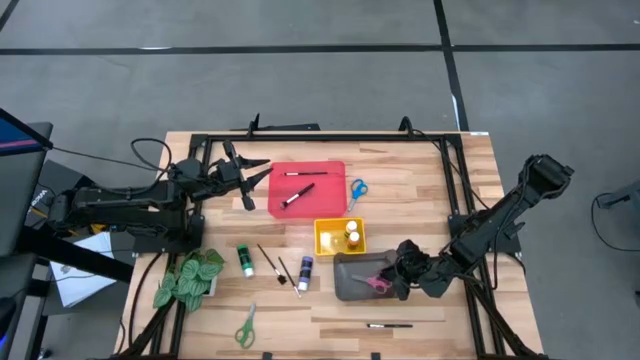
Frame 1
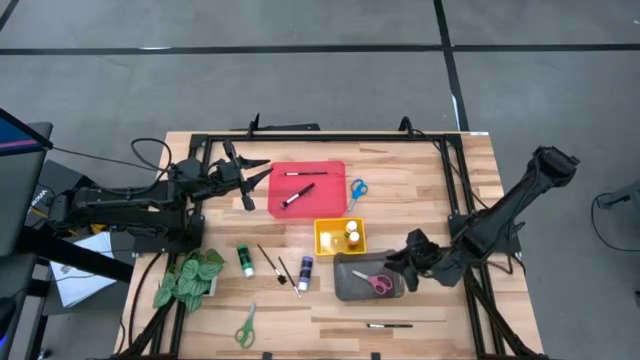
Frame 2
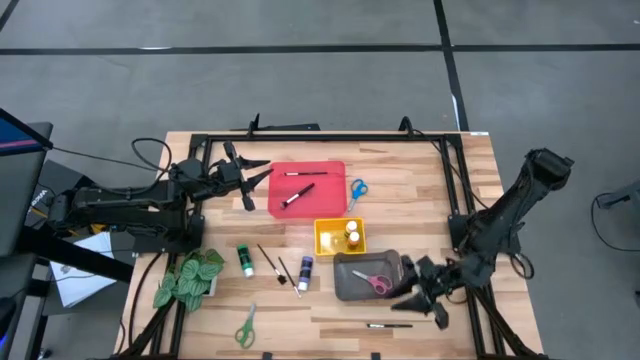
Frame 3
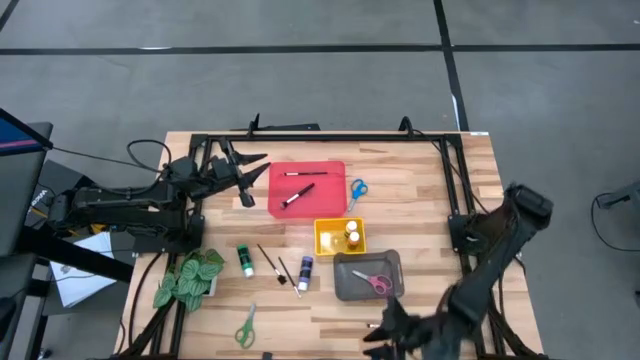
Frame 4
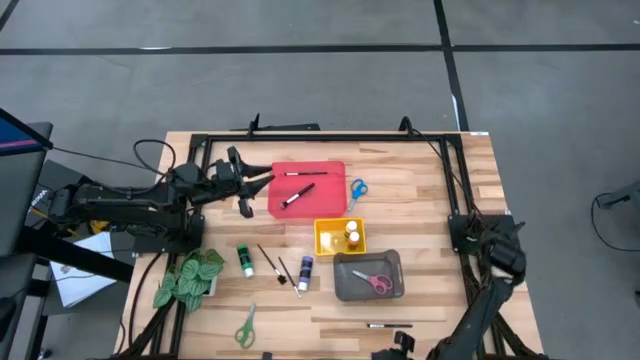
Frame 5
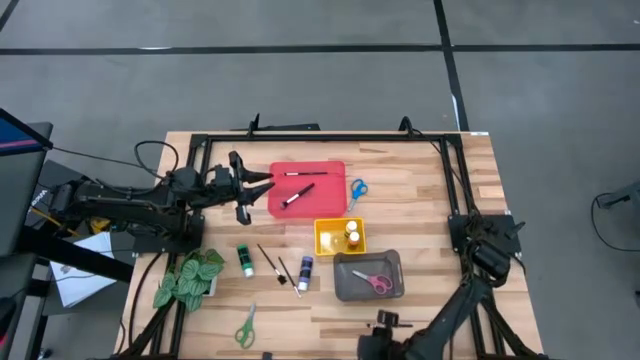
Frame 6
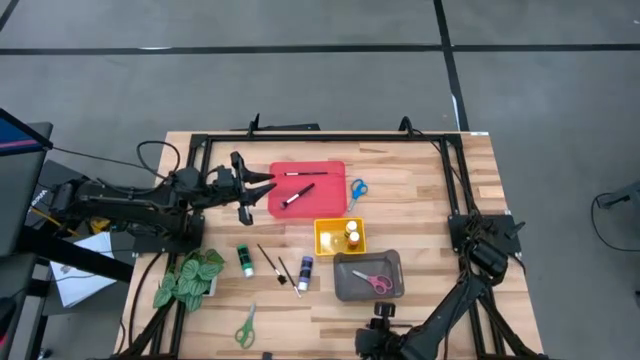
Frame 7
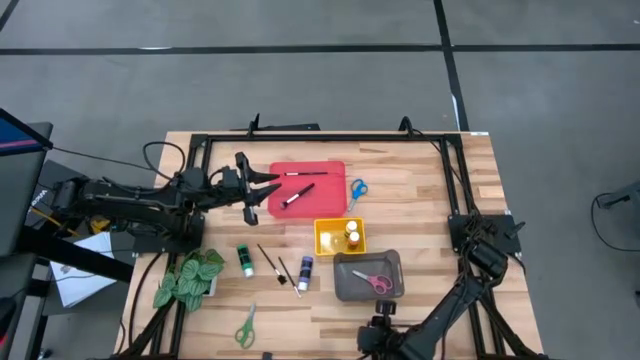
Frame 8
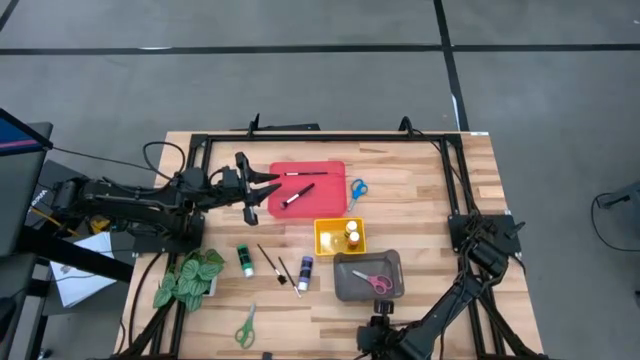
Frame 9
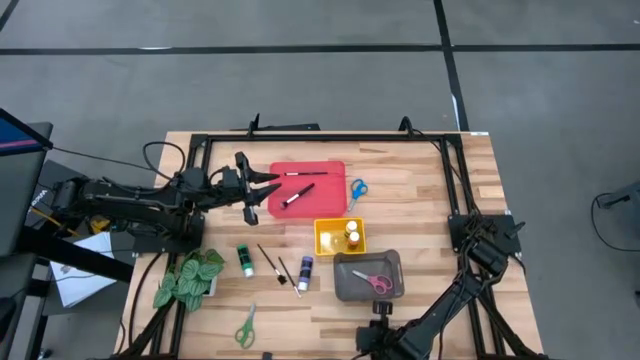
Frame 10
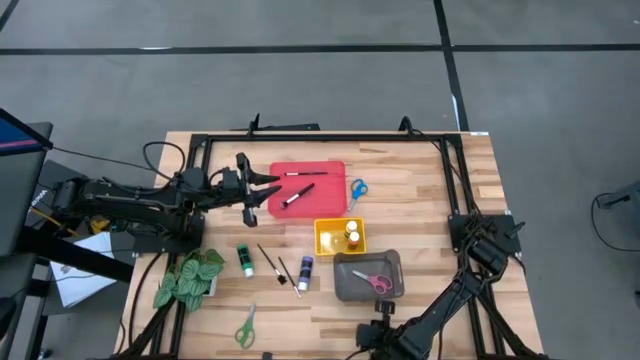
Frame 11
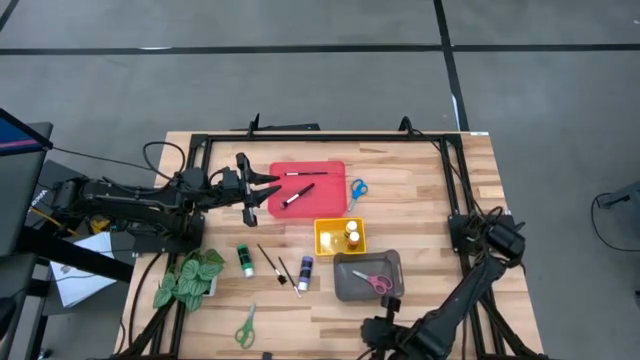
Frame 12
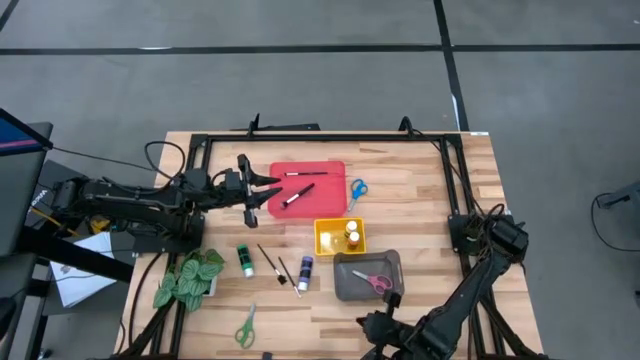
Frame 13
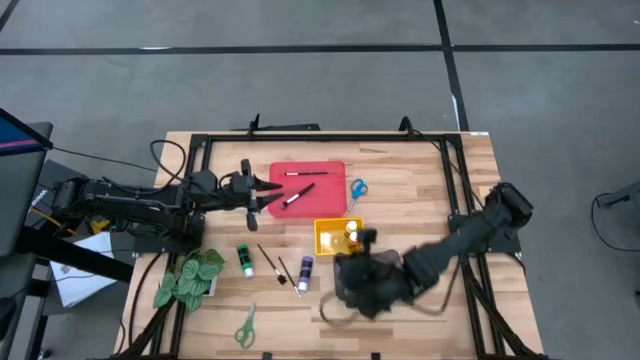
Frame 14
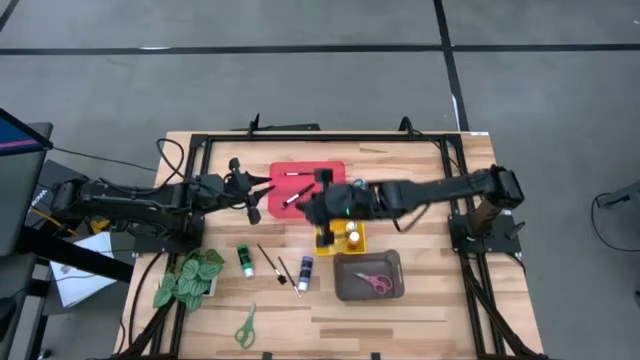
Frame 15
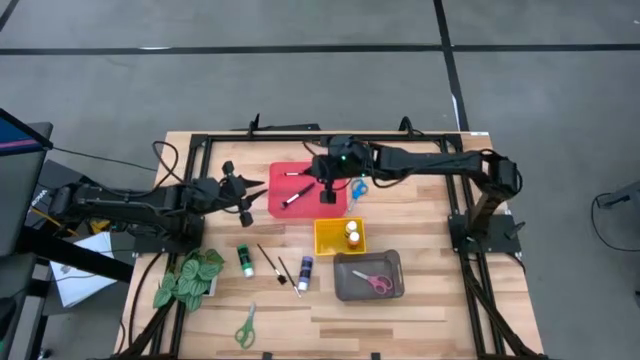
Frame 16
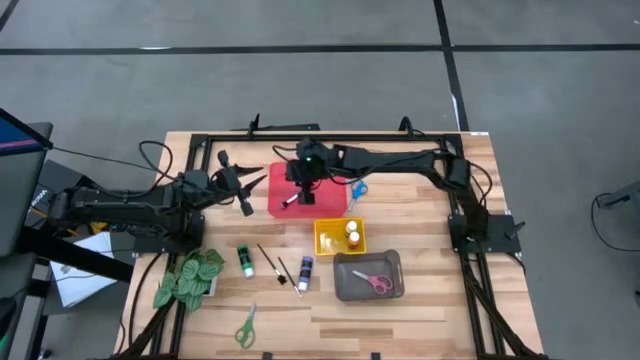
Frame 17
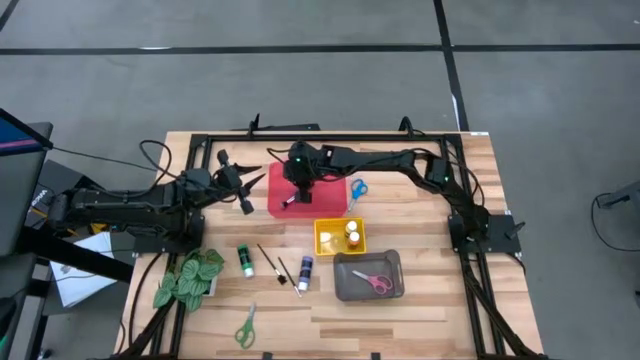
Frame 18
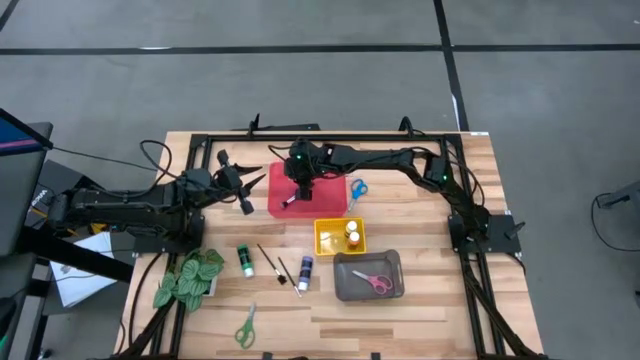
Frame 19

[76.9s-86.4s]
Task: Pick & Place Paint Supplies
Put the bottom eyeshadow brush into the red bin

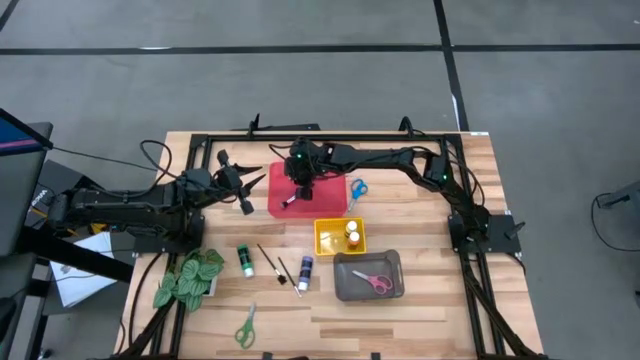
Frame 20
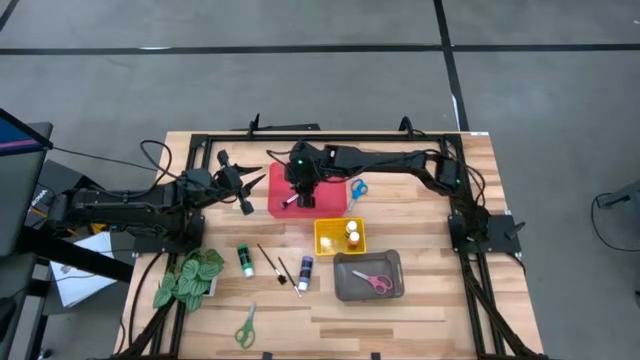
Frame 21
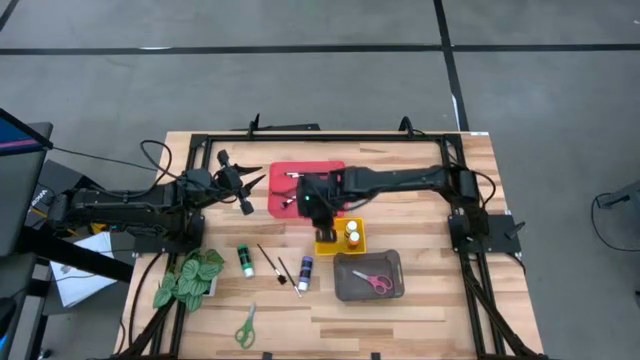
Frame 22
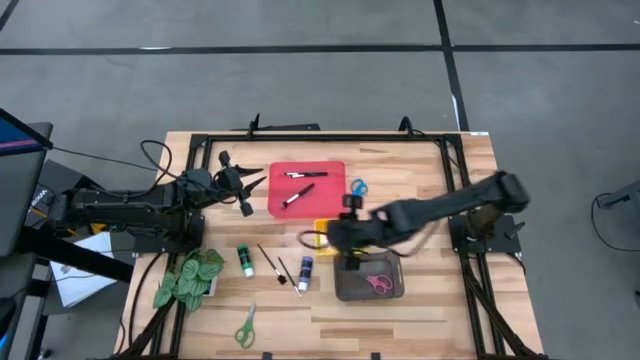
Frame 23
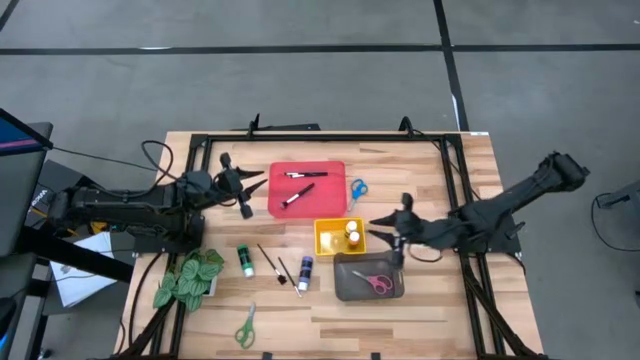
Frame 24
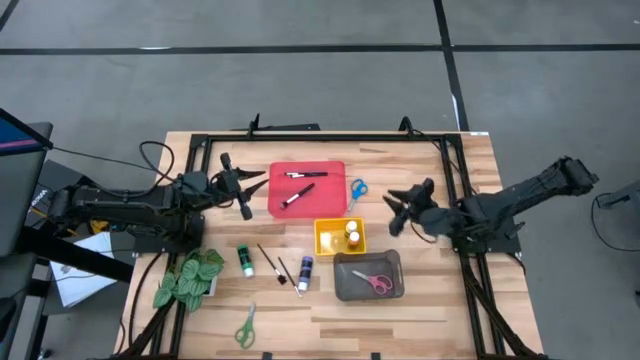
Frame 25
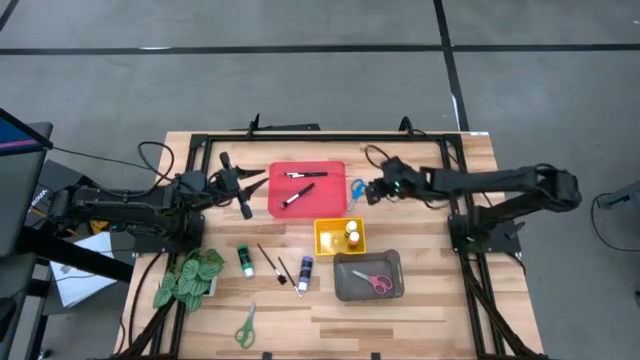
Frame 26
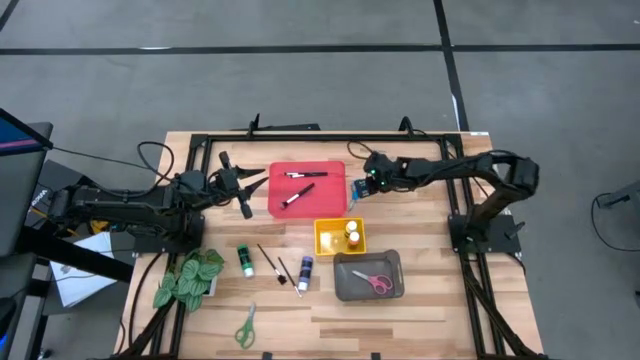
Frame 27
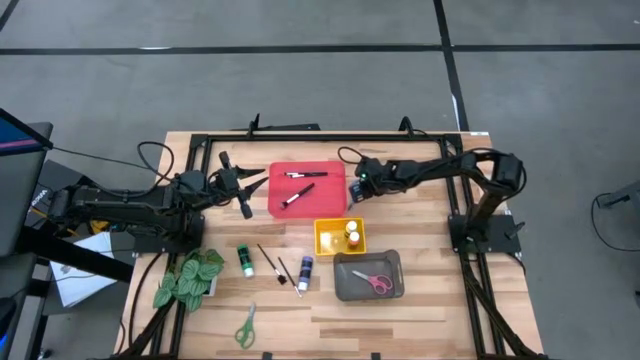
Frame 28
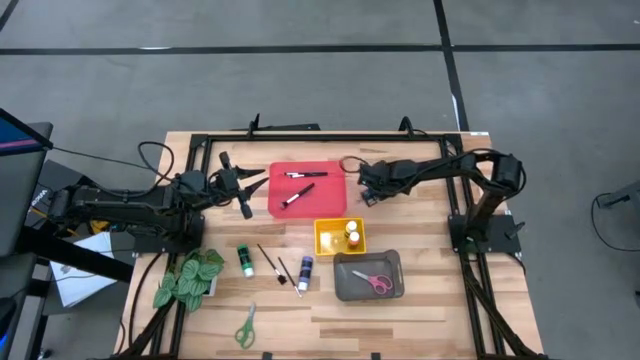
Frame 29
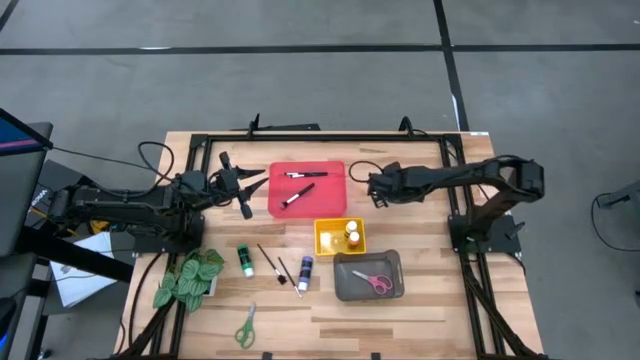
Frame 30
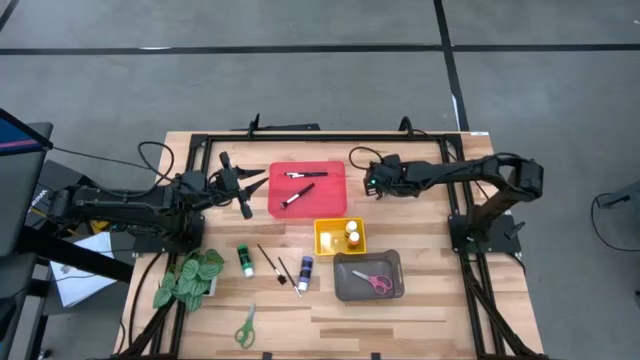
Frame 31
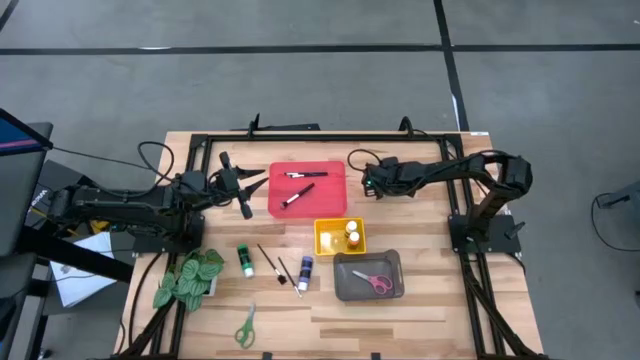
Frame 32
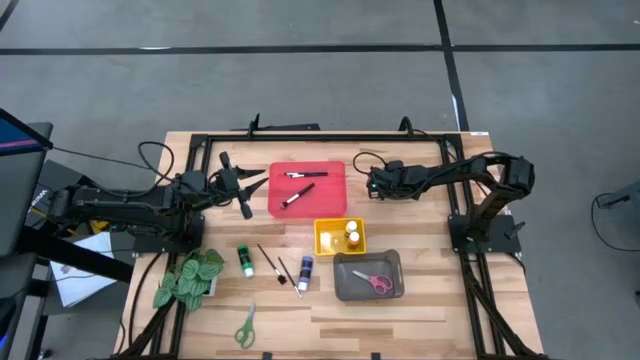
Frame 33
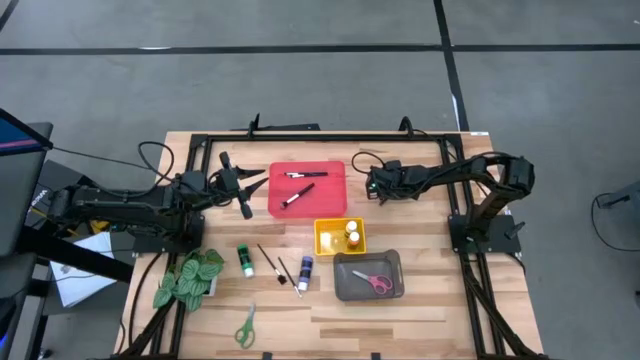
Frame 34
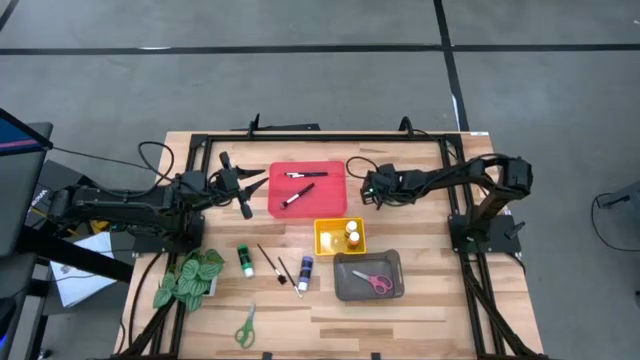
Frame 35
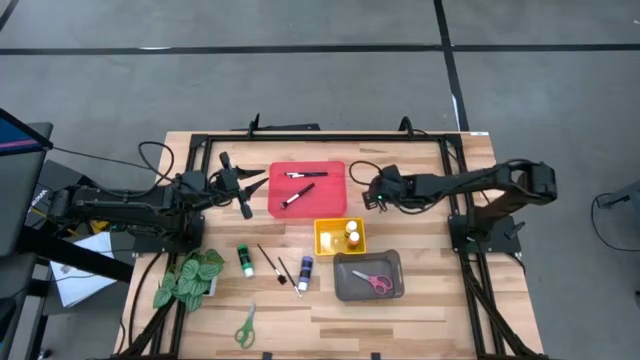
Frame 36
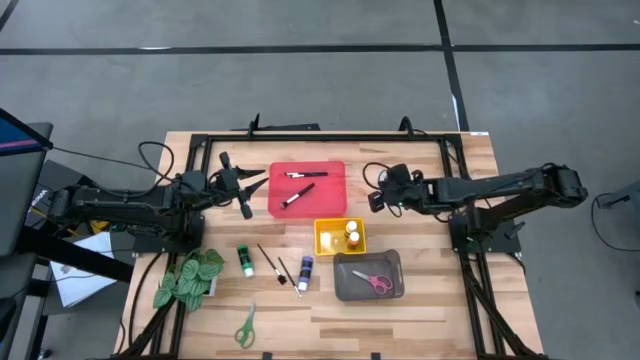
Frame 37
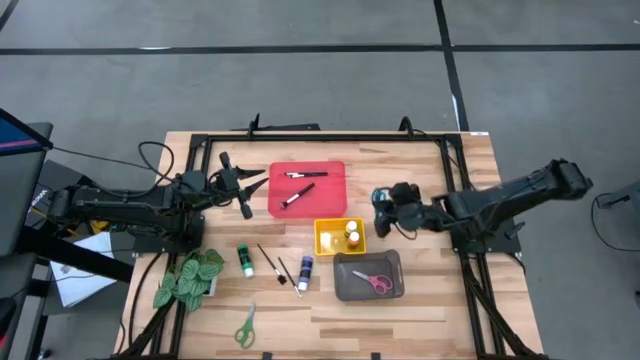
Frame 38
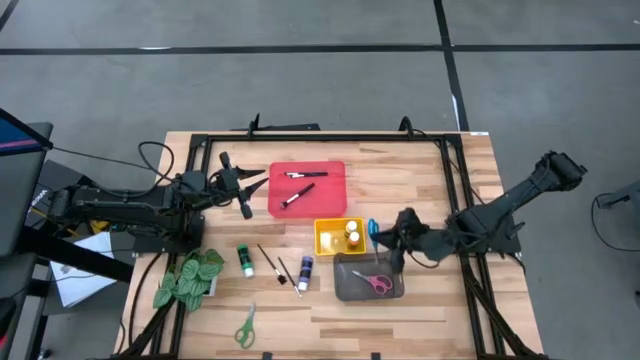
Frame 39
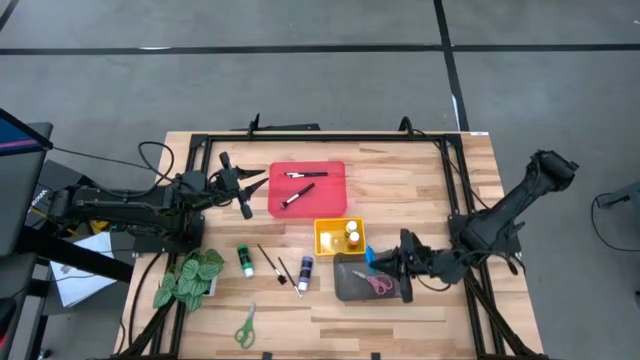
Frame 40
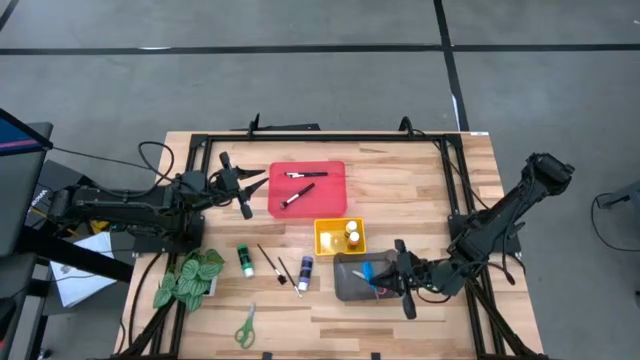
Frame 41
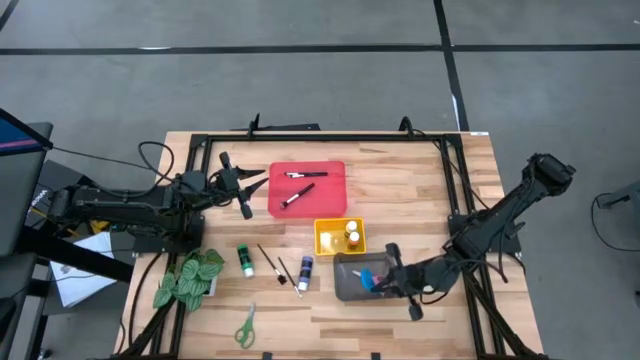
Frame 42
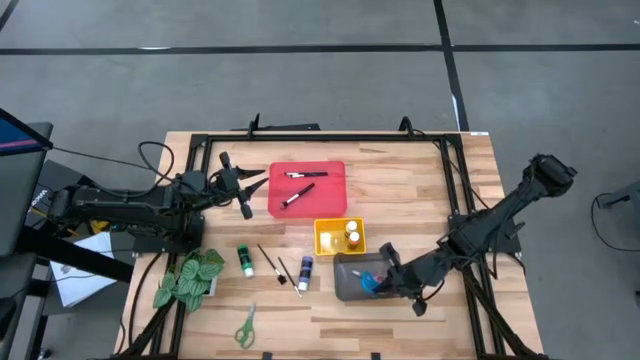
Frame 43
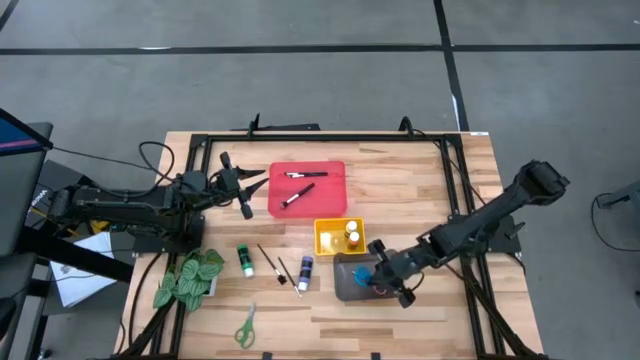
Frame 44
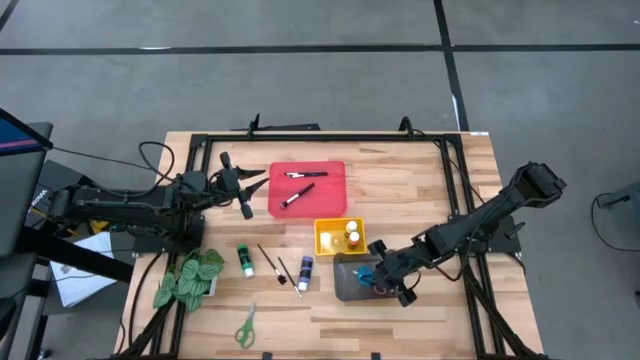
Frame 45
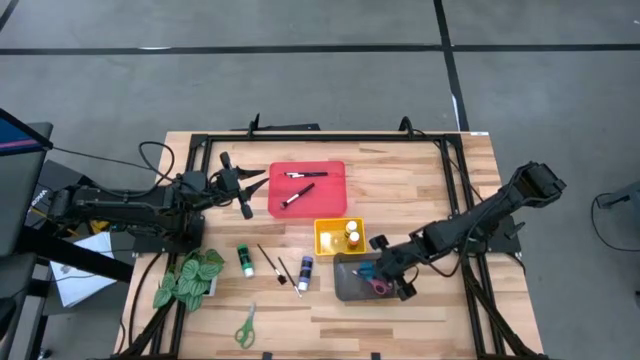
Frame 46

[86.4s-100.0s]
Put the blue scissors into the black bin
